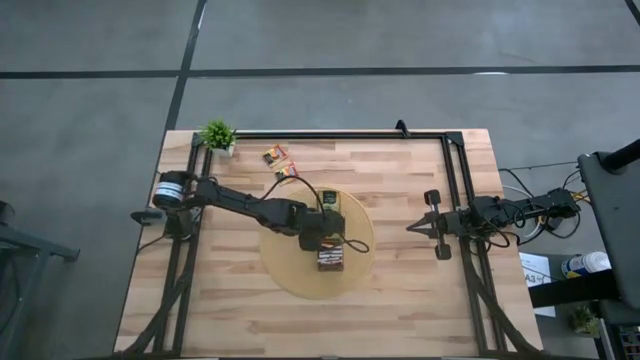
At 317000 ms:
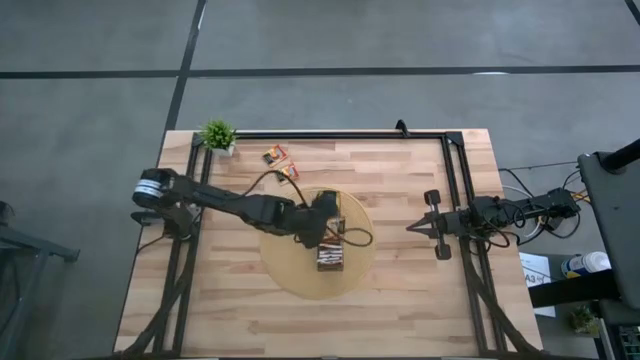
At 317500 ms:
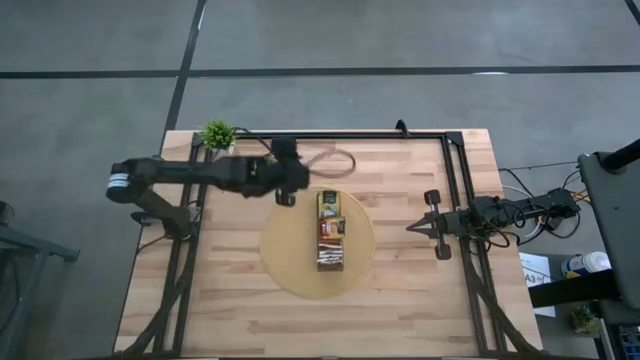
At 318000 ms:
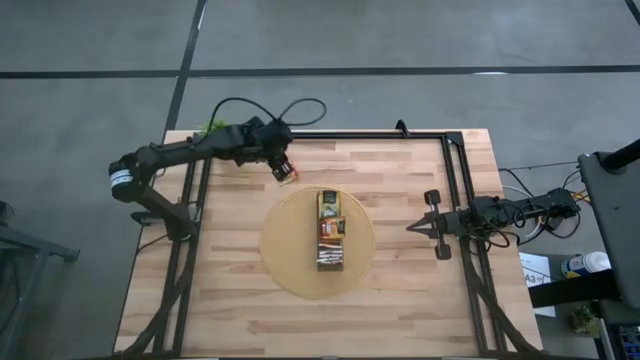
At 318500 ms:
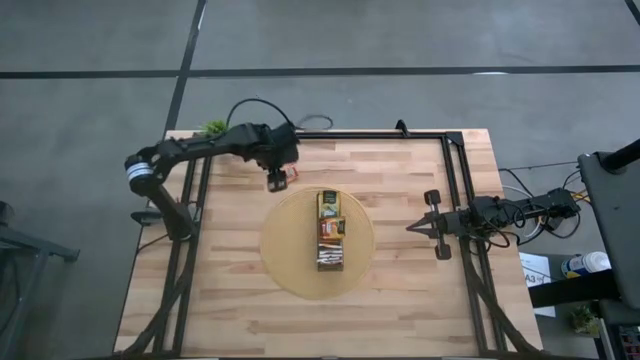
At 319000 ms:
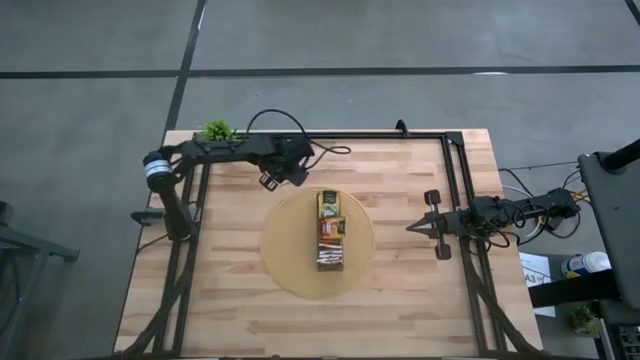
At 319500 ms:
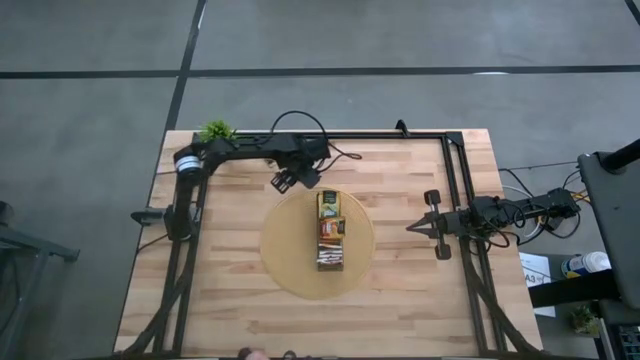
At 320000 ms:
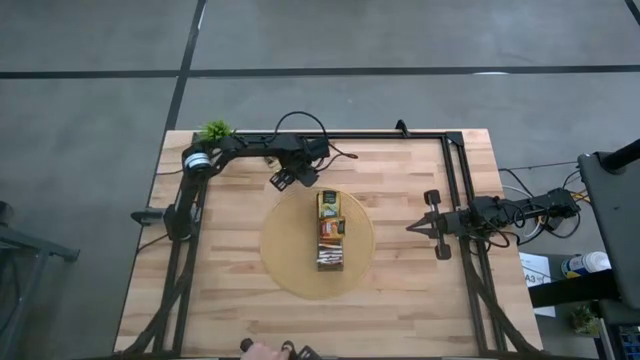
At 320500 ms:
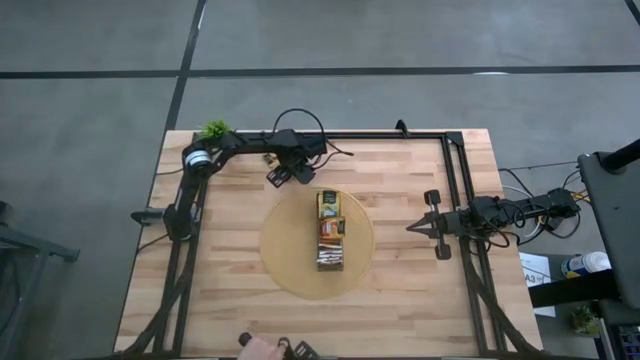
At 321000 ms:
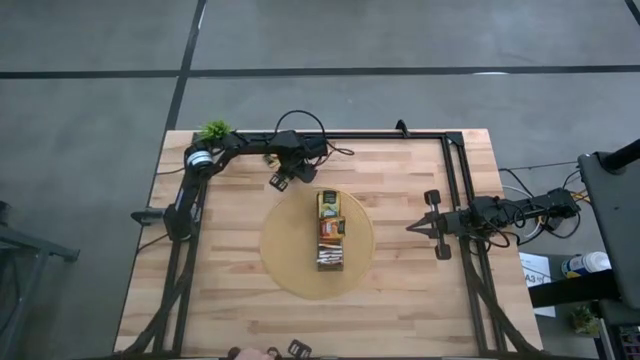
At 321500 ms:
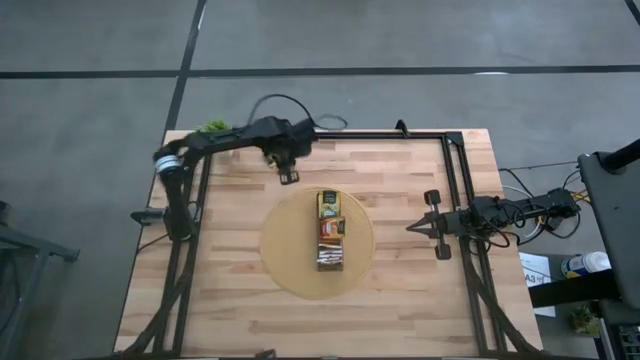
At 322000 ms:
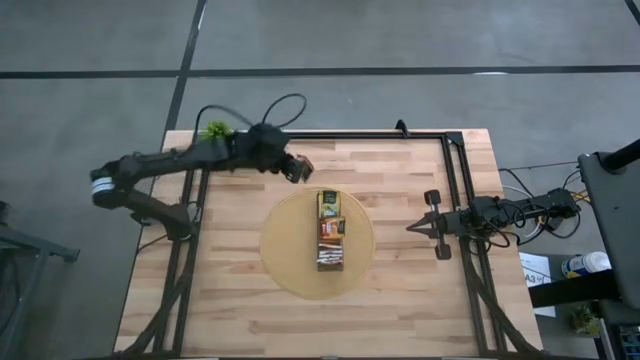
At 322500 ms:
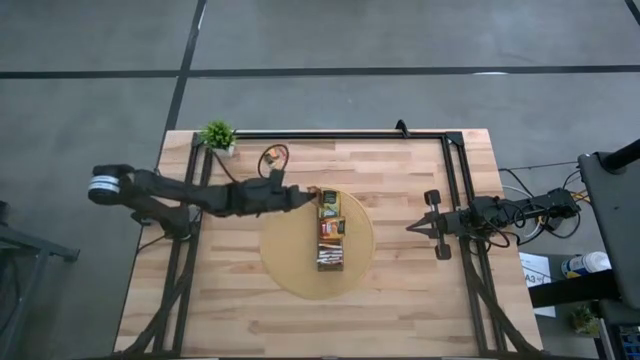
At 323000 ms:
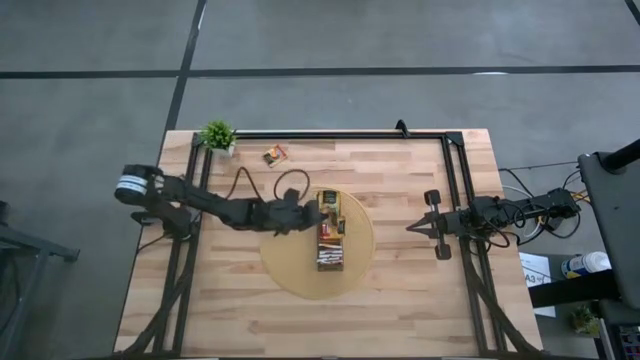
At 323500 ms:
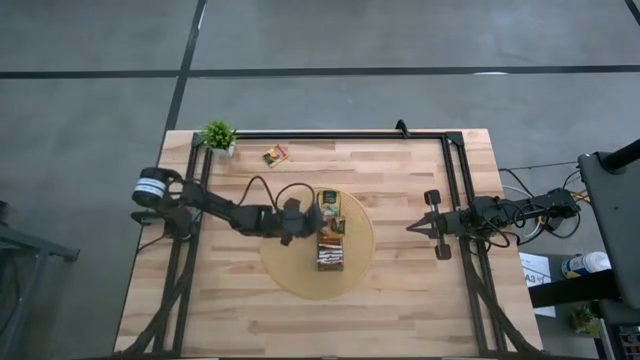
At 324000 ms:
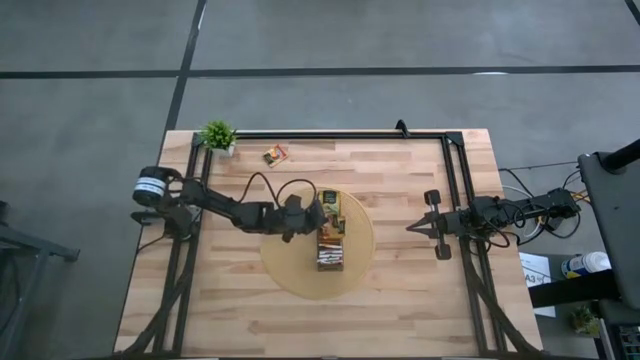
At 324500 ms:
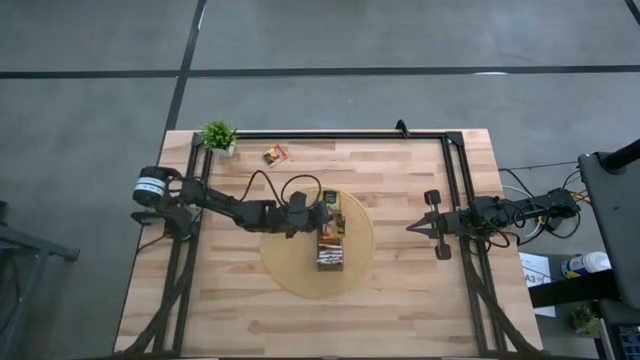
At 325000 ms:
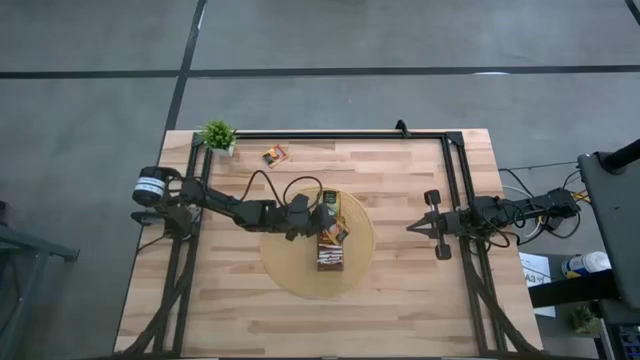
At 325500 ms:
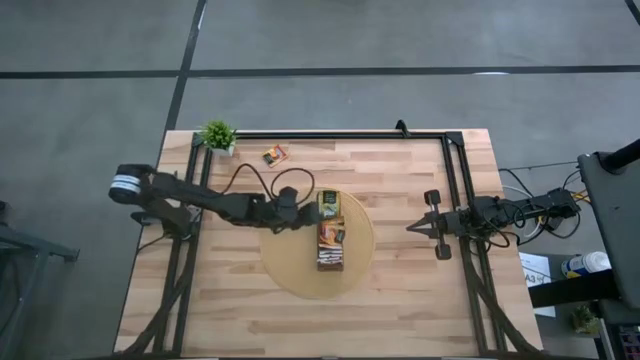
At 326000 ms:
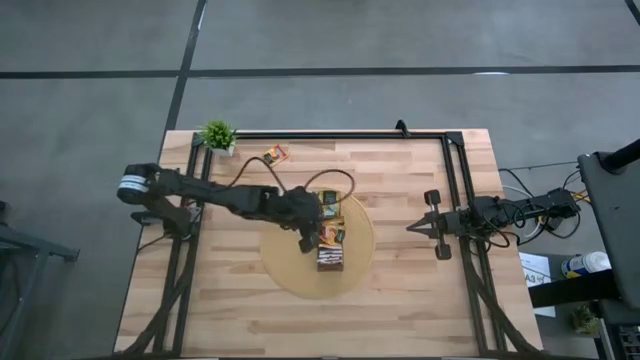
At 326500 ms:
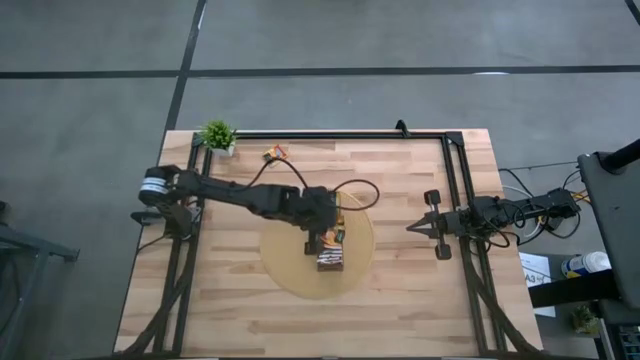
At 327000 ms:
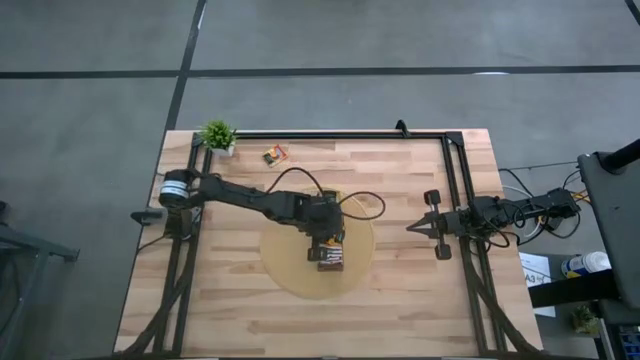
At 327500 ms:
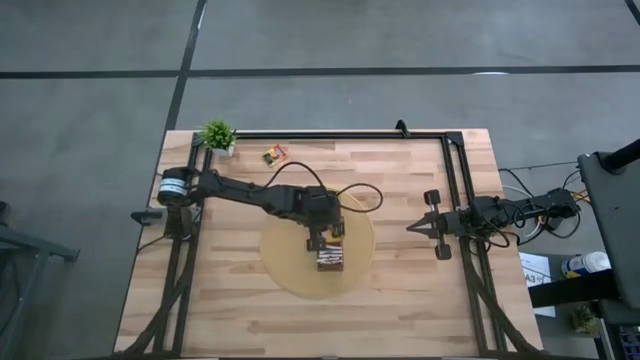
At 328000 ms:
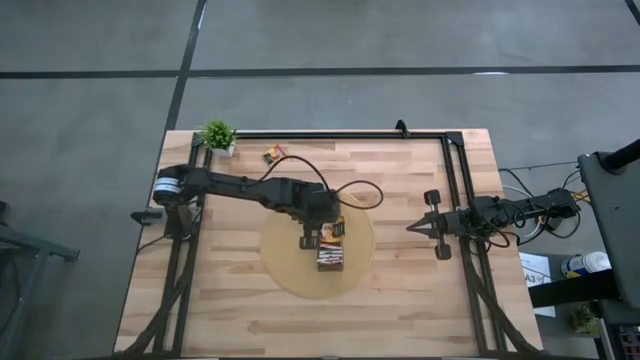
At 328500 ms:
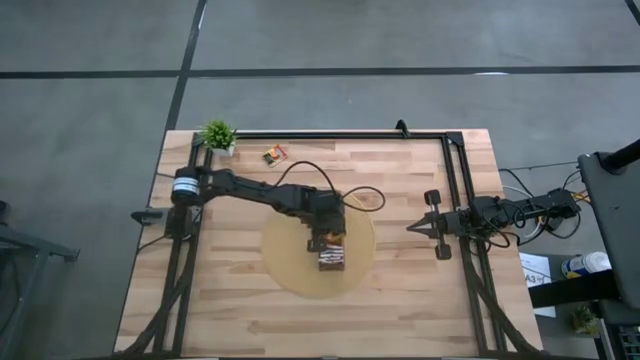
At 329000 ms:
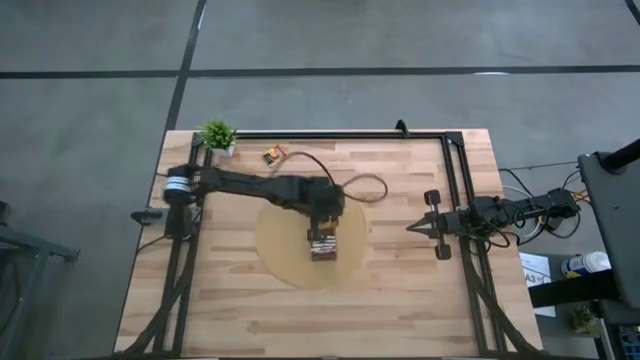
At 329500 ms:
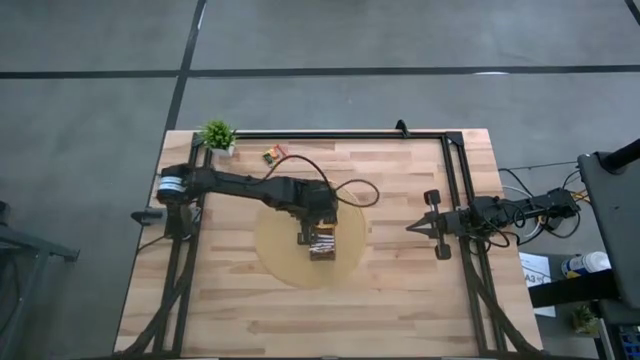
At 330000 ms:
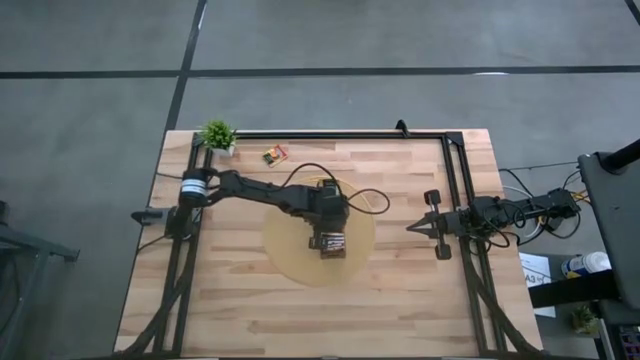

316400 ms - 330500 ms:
Task: Pick & Place Tea
Put the bottom orange tea bag into the middle section of the wooden organizer

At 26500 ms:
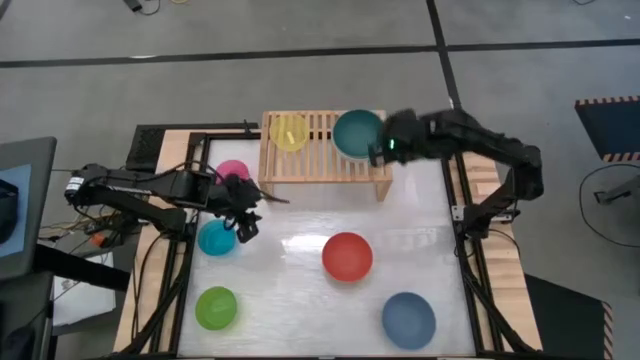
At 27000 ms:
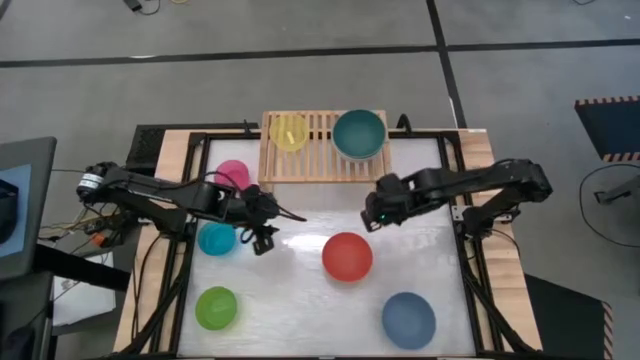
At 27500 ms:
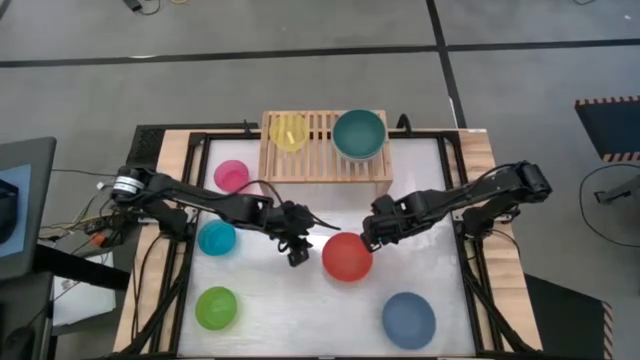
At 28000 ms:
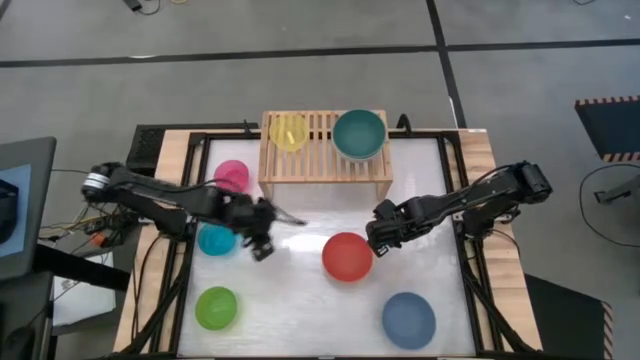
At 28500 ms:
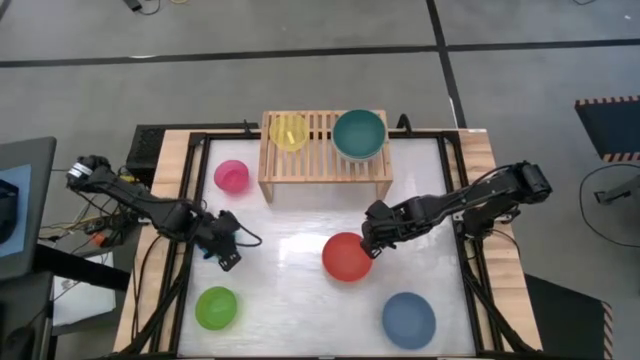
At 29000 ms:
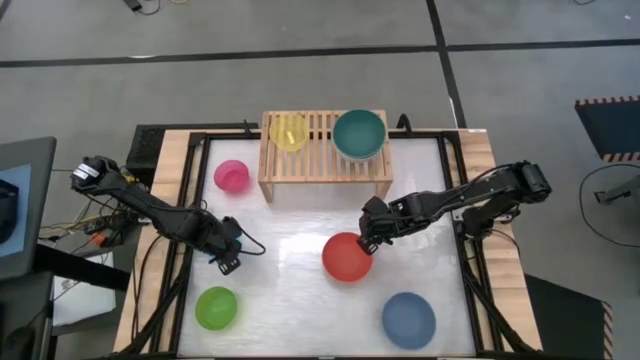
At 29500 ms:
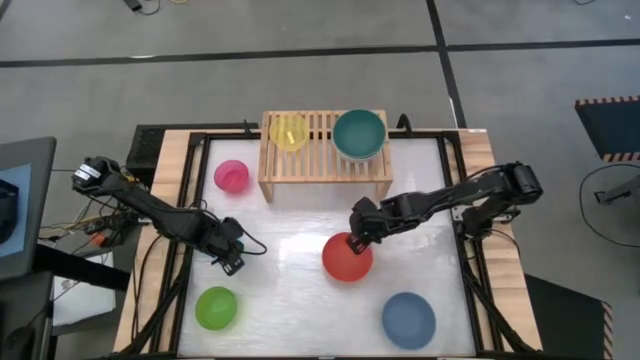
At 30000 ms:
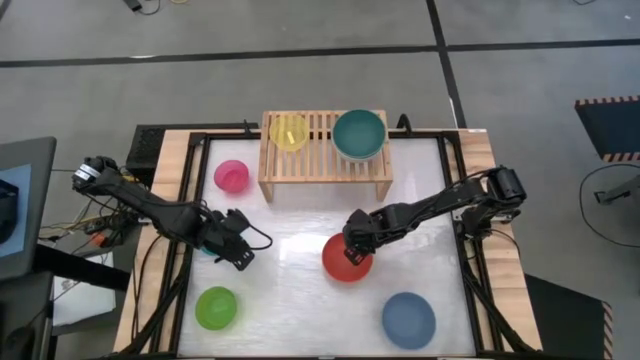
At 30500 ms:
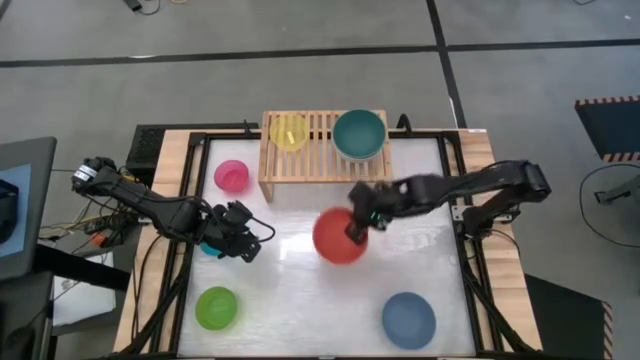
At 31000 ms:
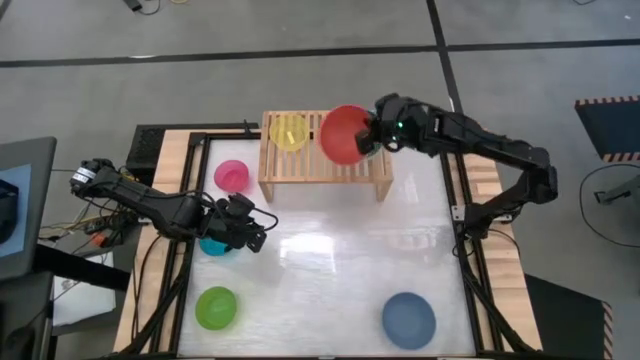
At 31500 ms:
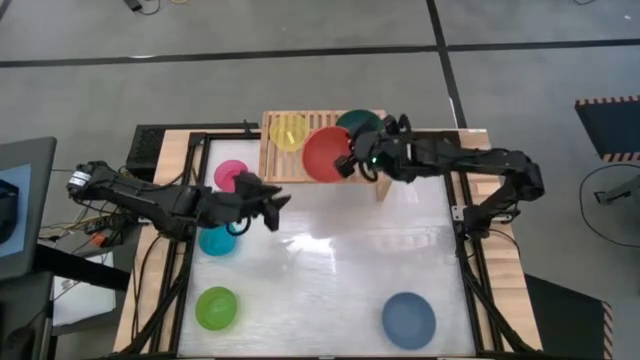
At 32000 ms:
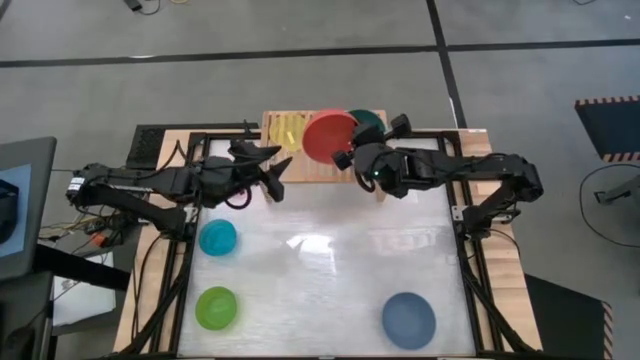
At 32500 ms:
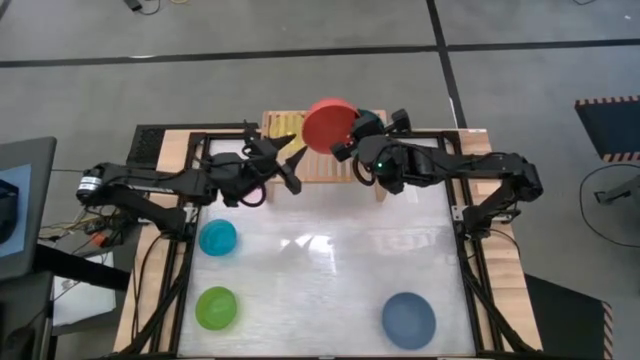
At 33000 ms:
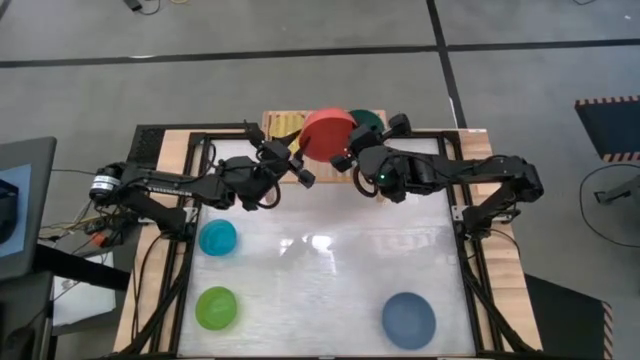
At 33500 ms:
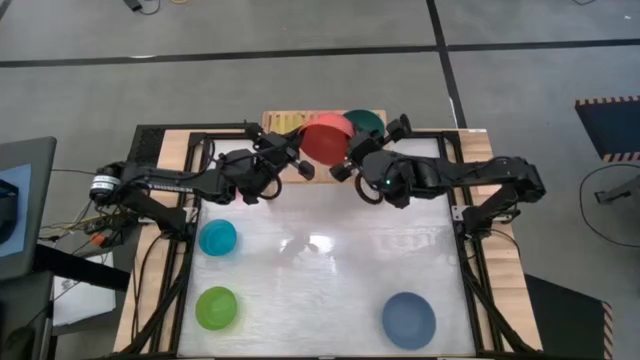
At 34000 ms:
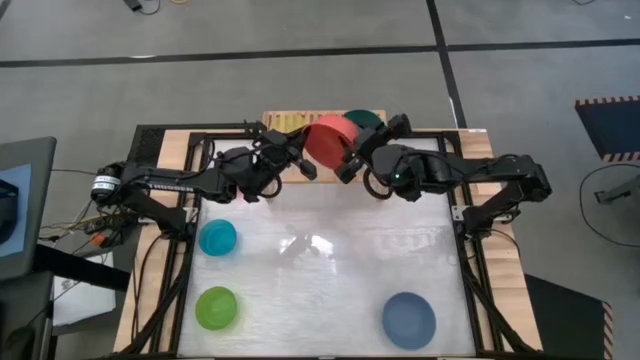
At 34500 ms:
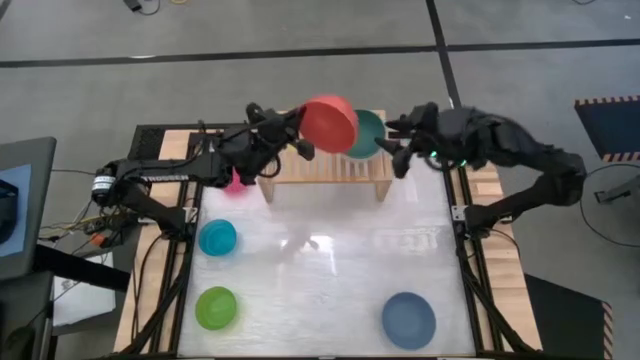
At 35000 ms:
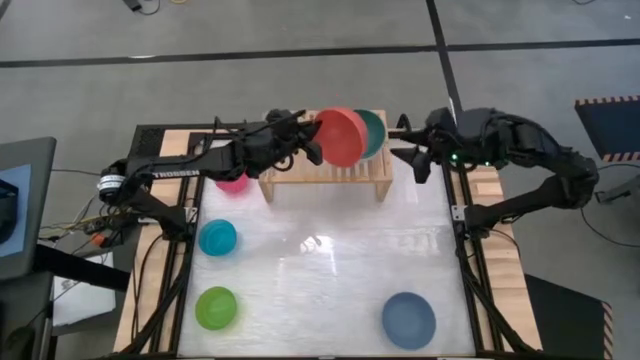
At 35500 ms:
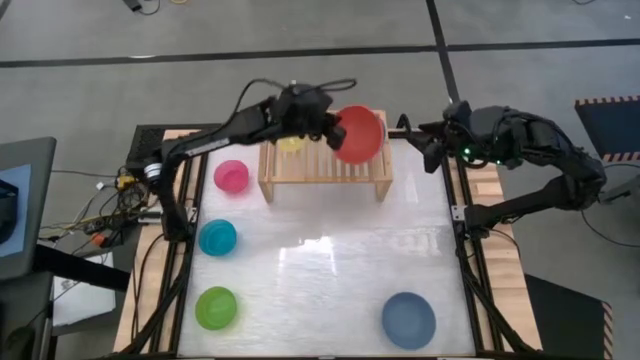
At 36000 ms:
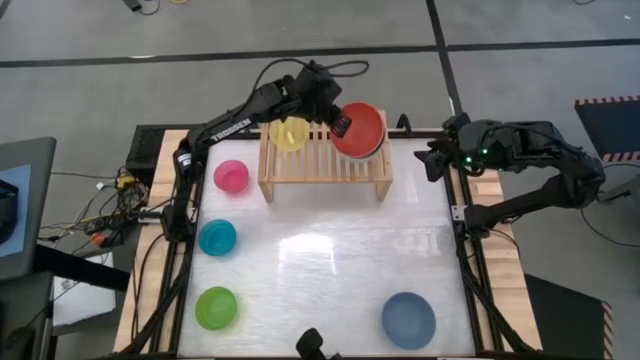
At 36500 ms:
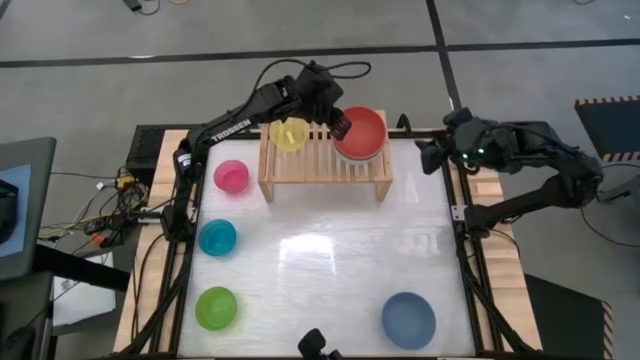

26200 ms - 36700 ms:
Task: Place and stack bowls onto a shelf
Stack the orange bowl on top of the green bowl on the shelf
